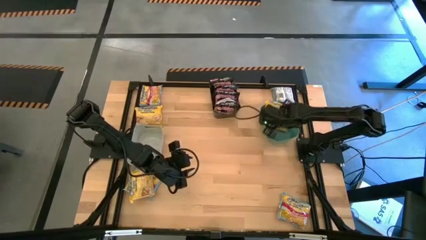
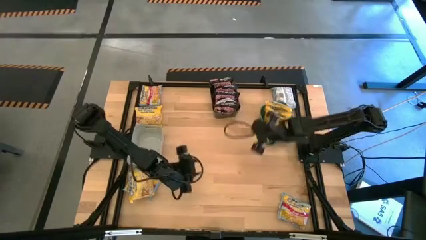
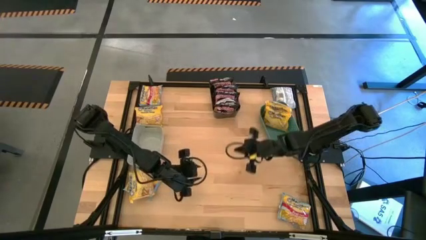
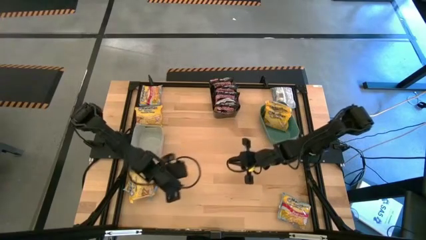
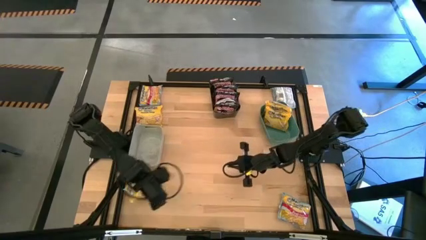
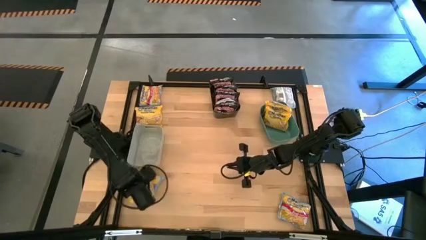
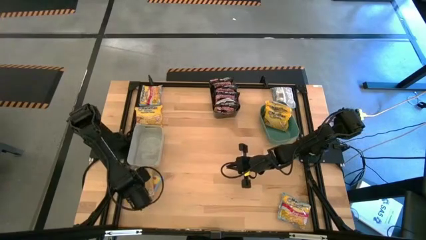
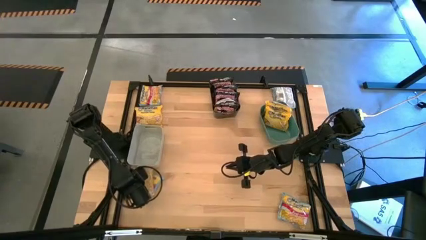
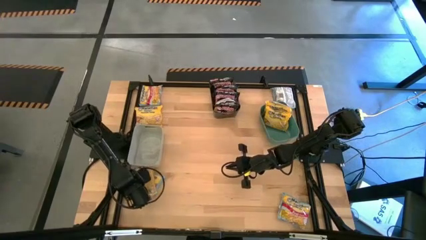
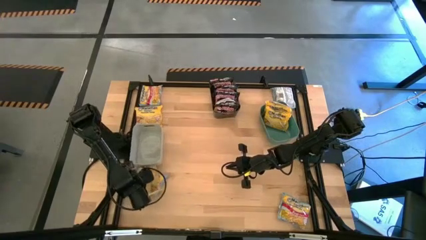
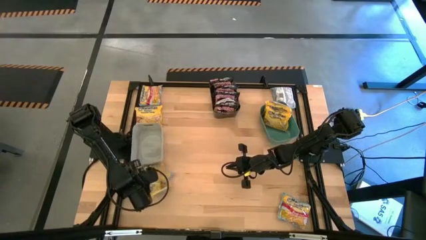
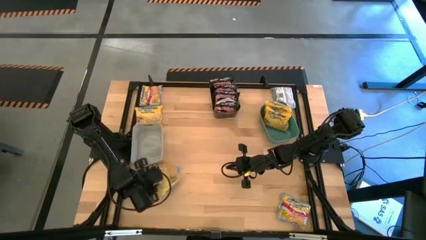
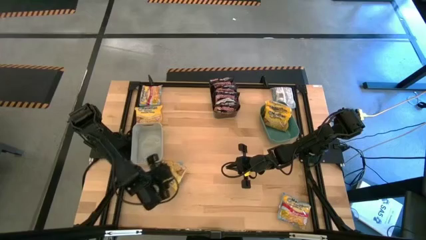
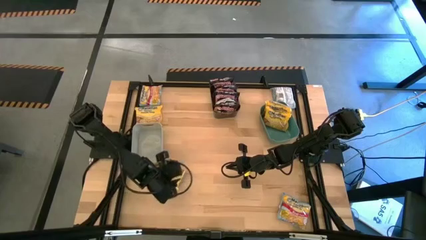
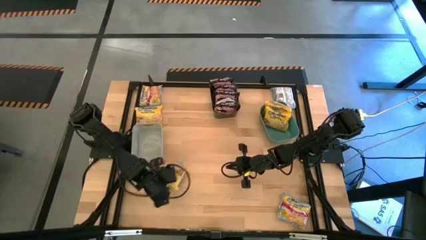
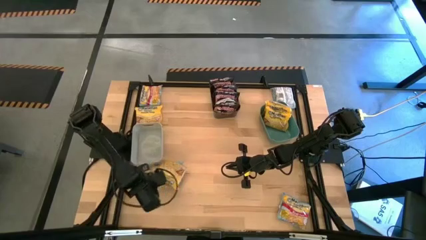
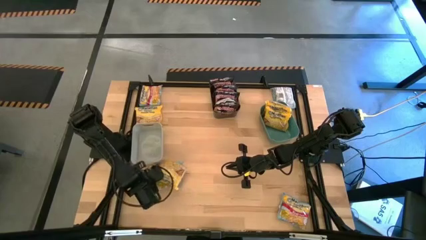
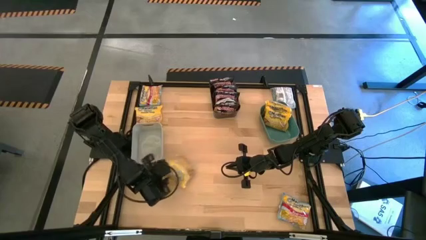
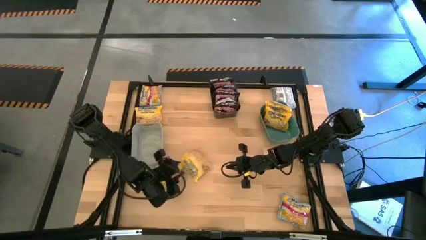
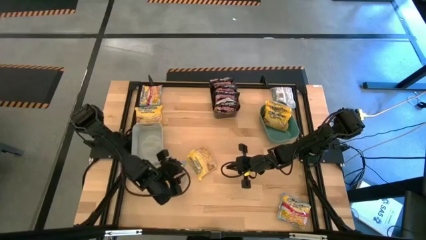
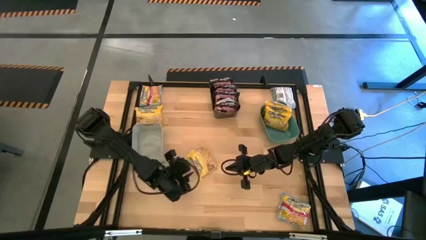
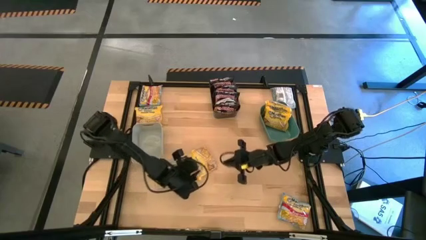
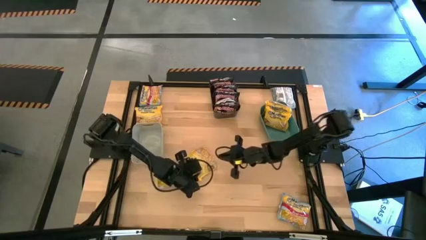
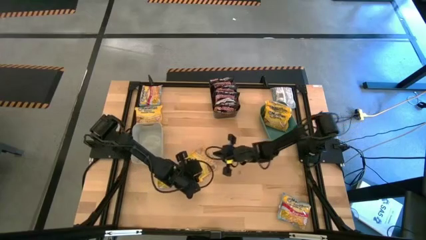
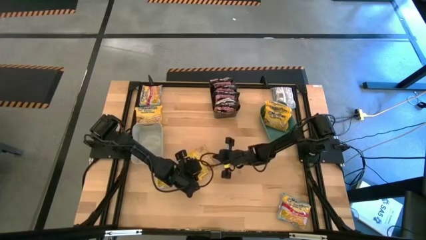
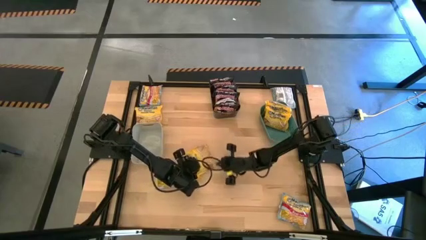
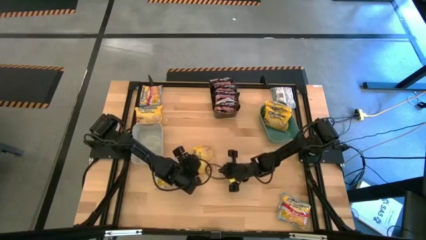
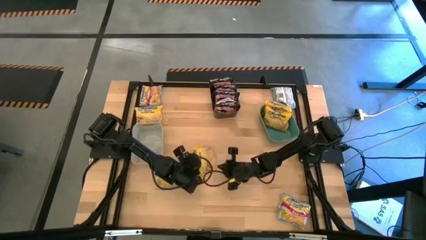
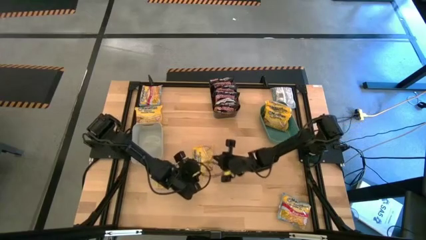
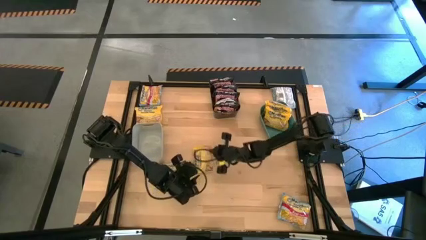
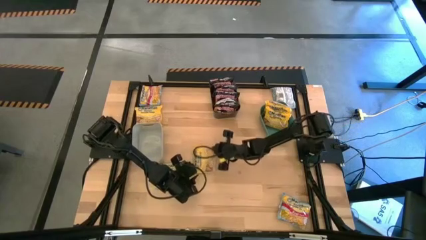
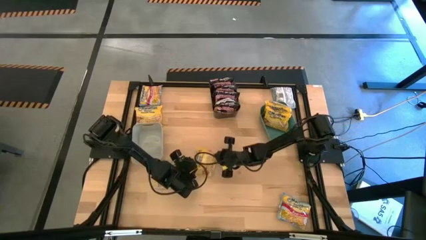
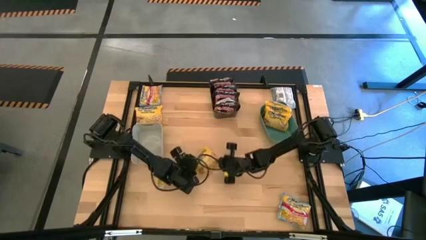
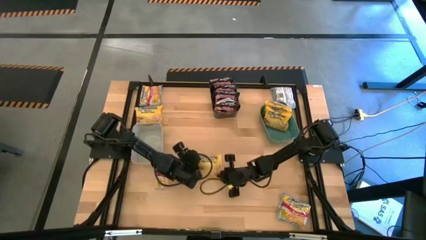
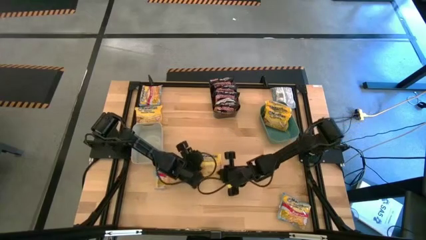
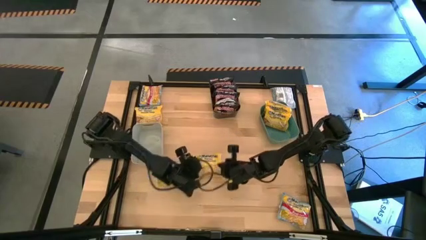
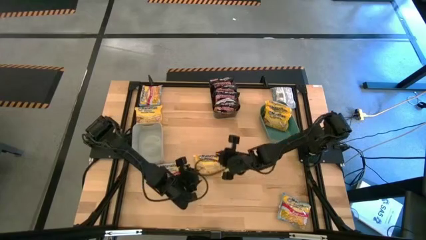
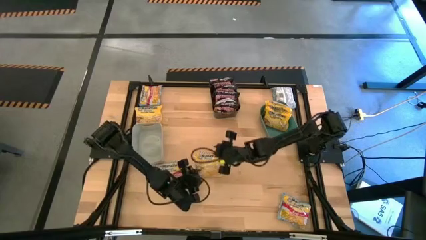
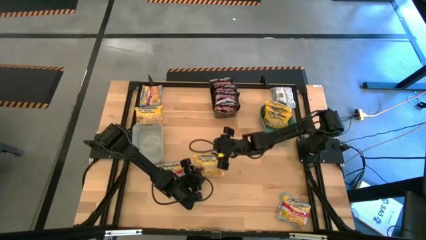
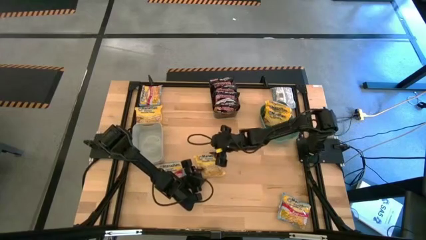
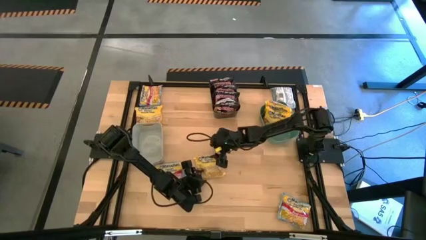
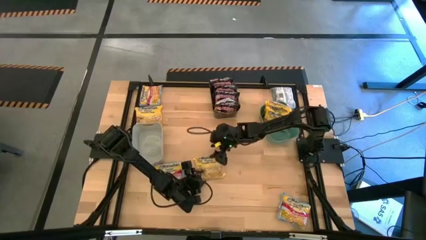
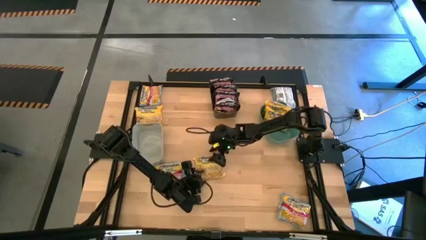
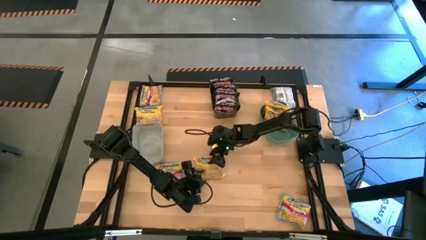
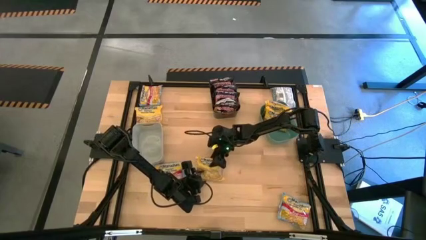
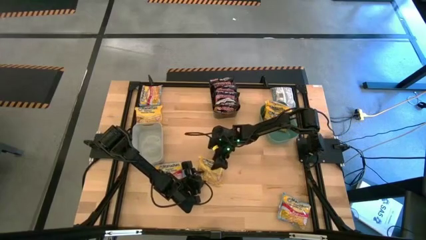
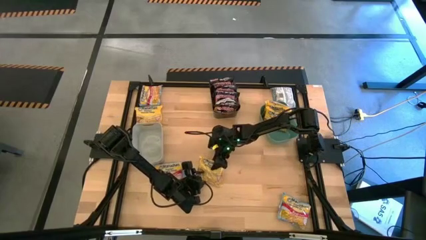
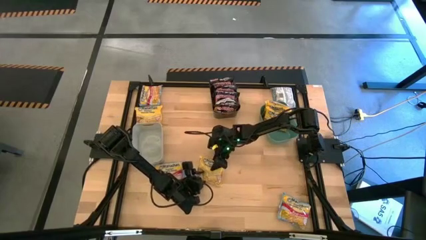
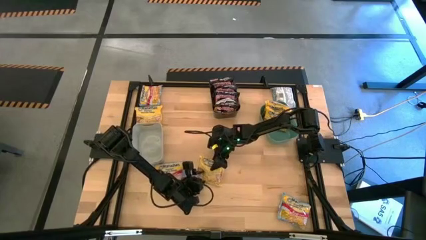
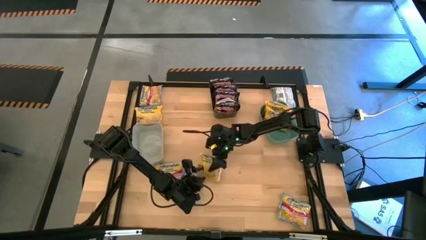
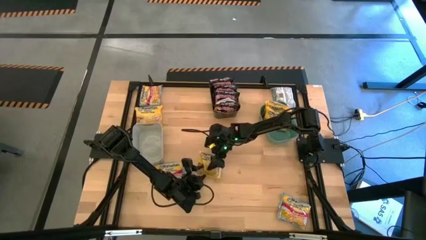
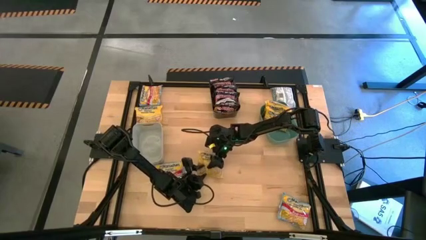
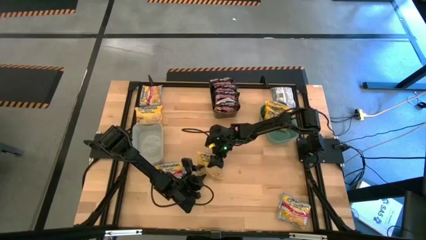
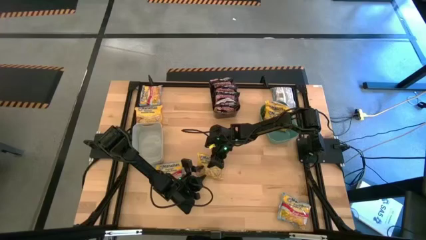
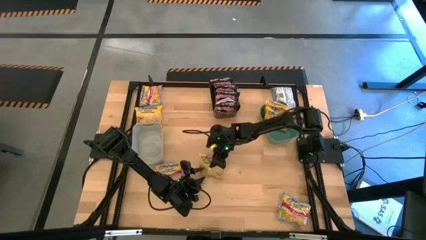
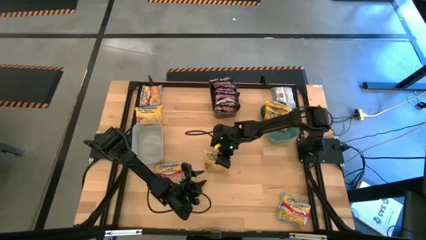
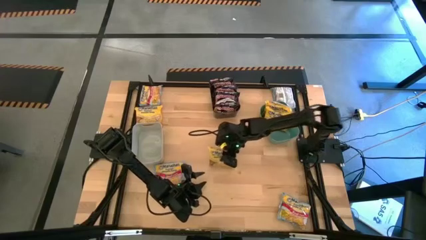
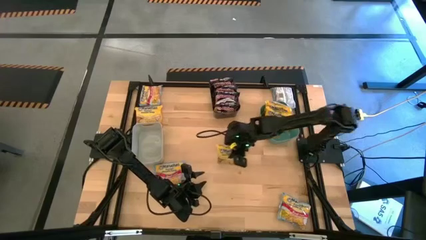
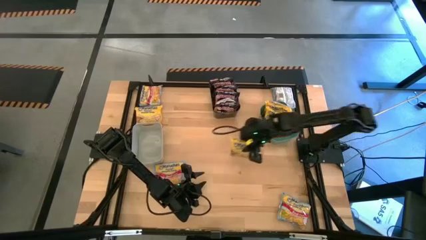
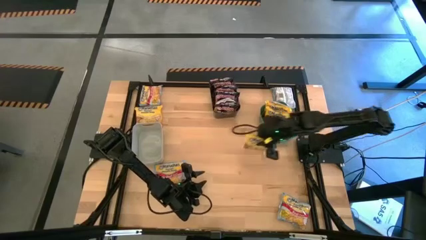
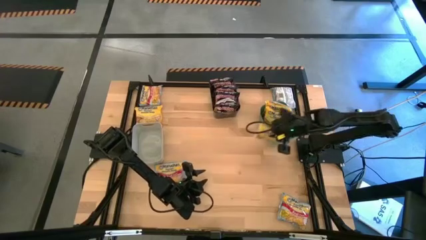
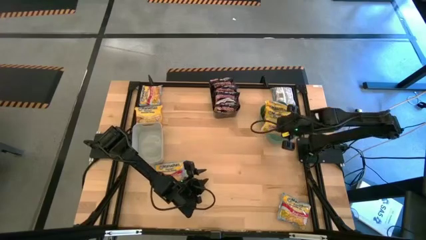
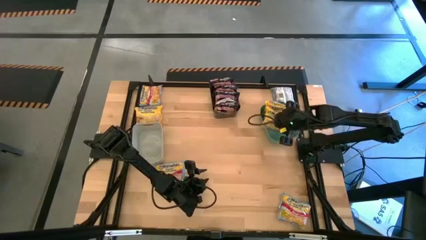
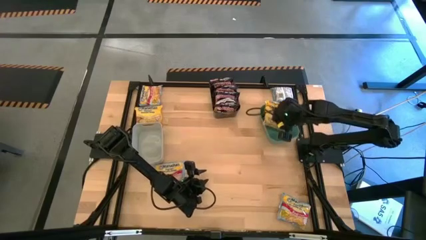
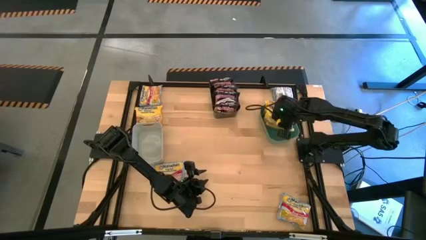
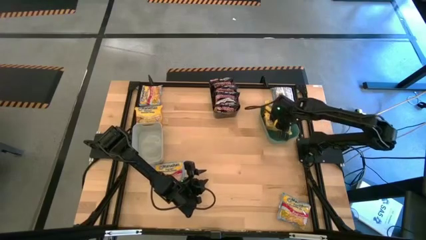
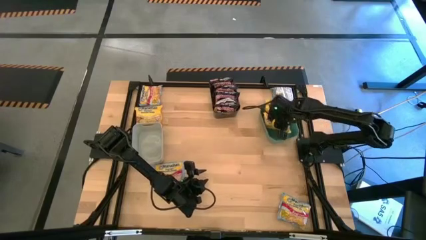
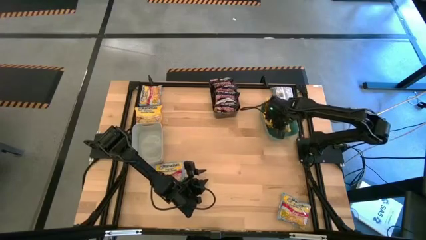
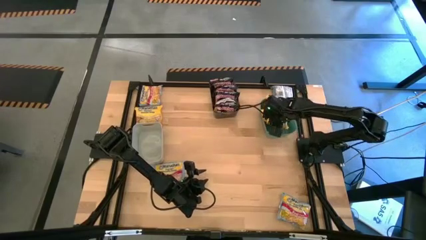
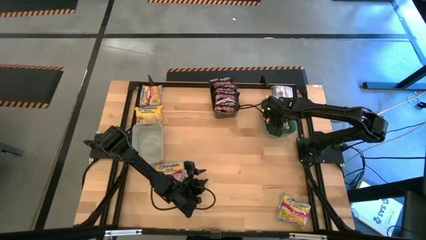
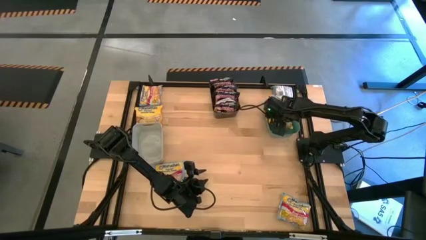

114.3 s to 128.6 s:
Task: Sort Maruchan noodles
Put the yellow noodle pack into the blue bin
